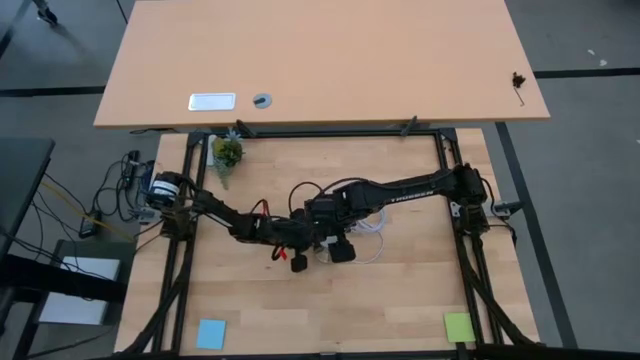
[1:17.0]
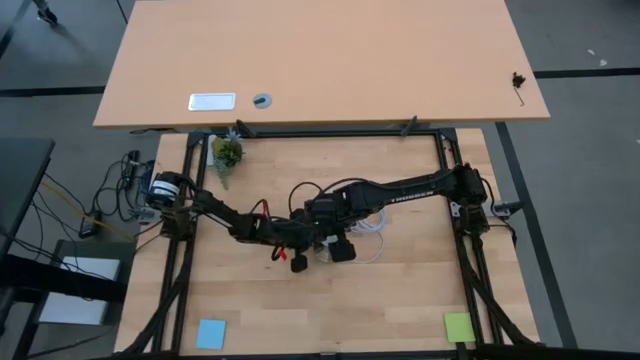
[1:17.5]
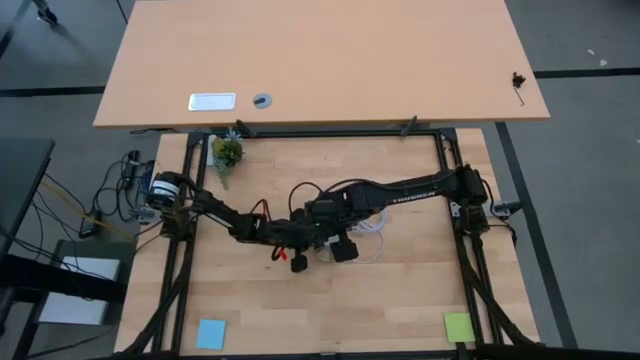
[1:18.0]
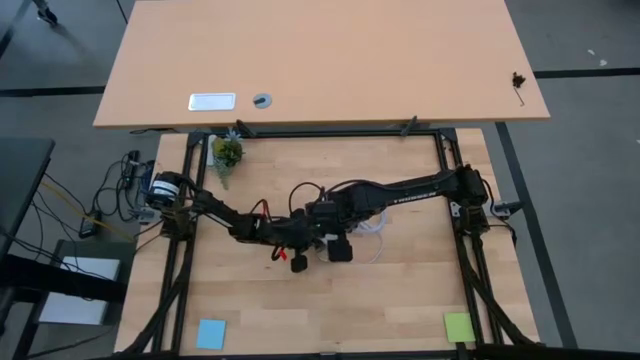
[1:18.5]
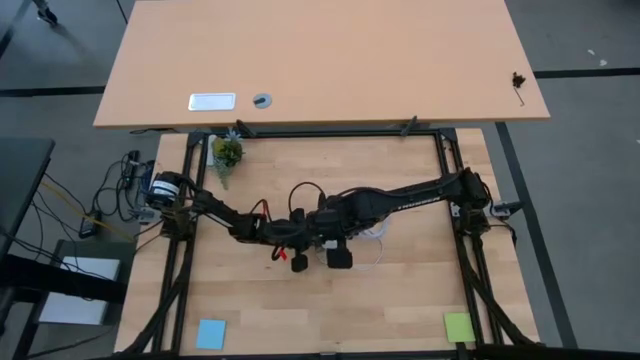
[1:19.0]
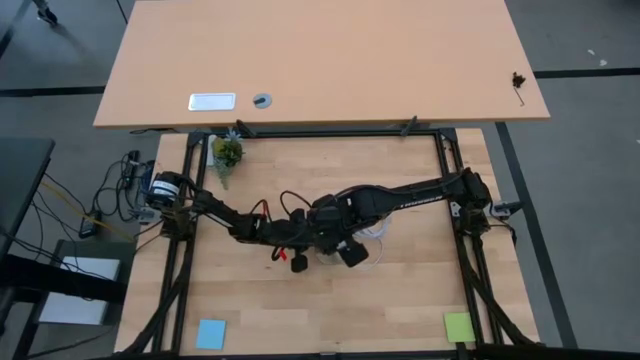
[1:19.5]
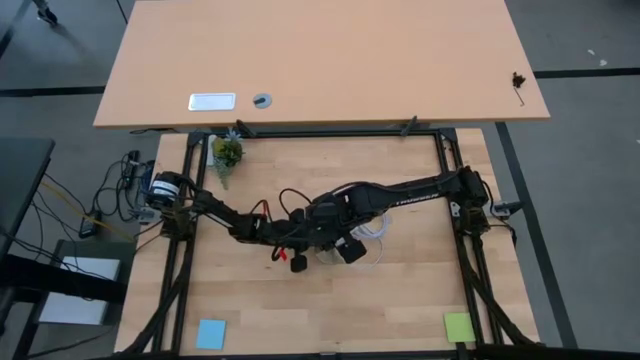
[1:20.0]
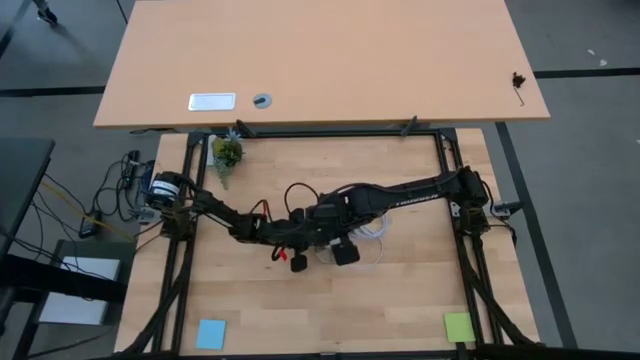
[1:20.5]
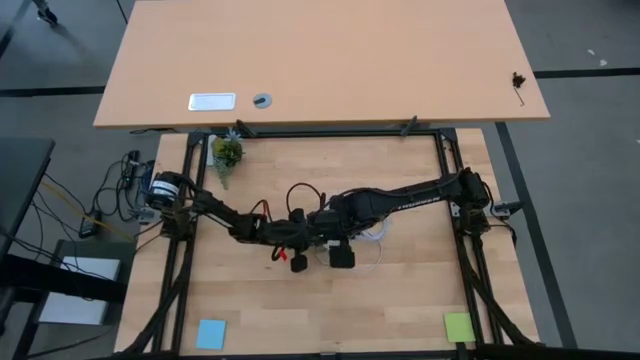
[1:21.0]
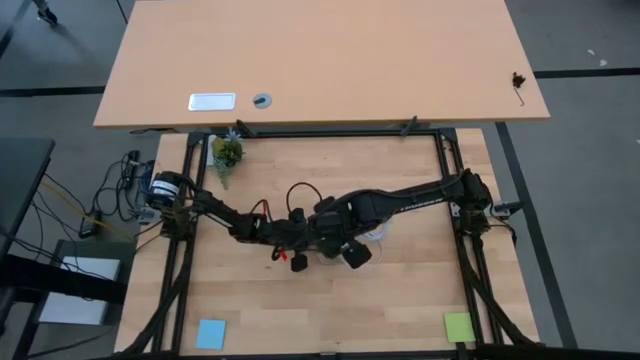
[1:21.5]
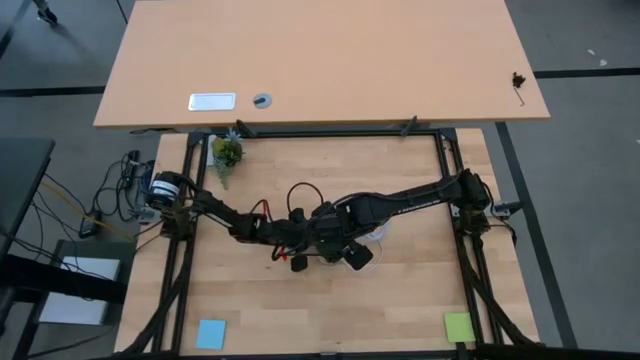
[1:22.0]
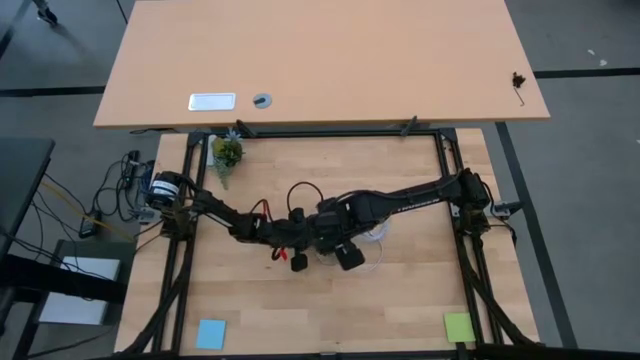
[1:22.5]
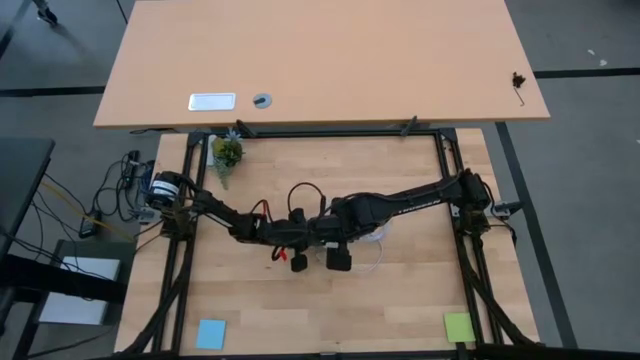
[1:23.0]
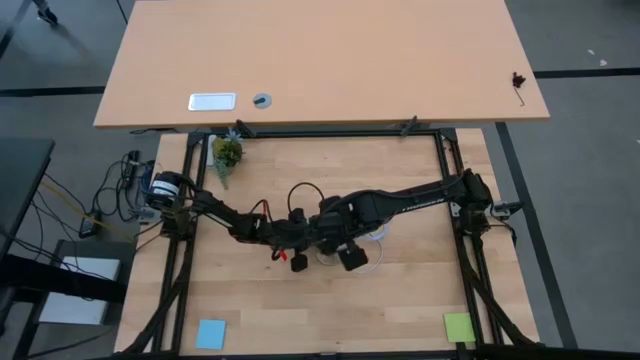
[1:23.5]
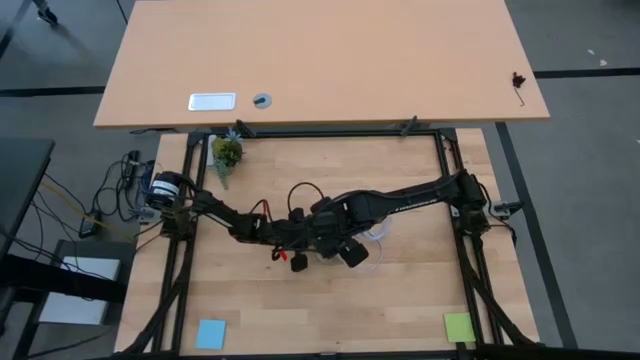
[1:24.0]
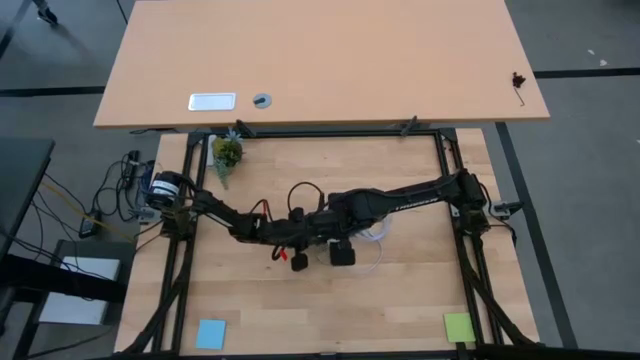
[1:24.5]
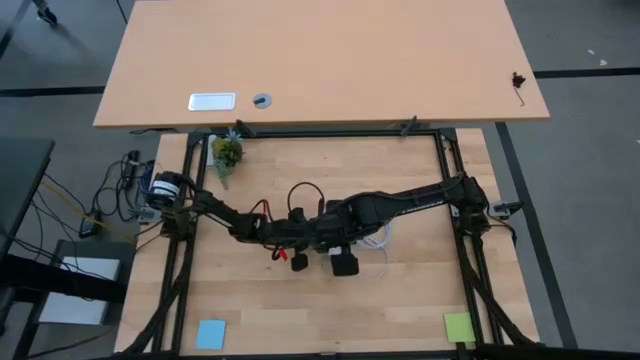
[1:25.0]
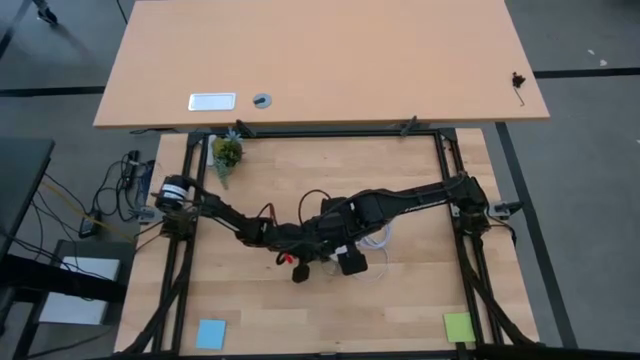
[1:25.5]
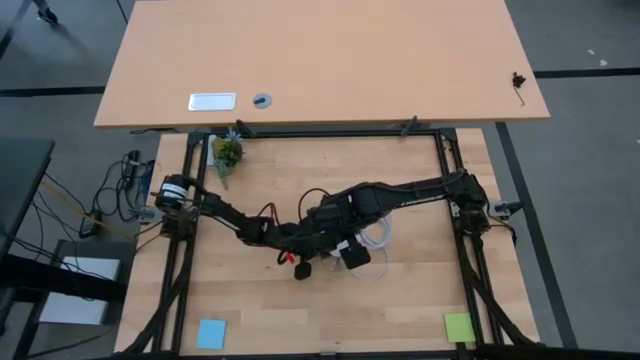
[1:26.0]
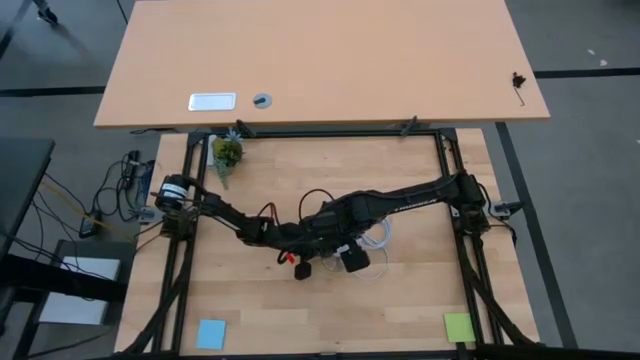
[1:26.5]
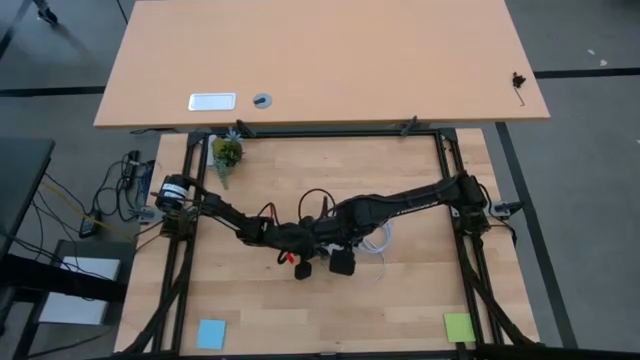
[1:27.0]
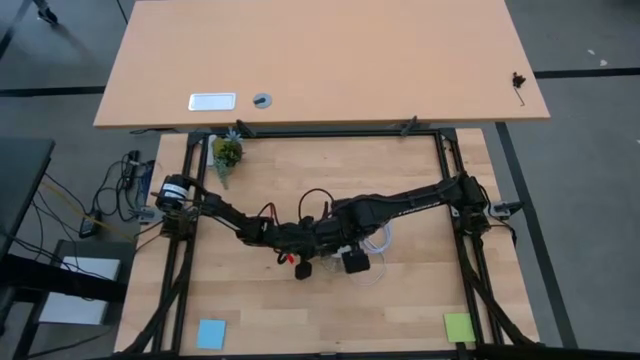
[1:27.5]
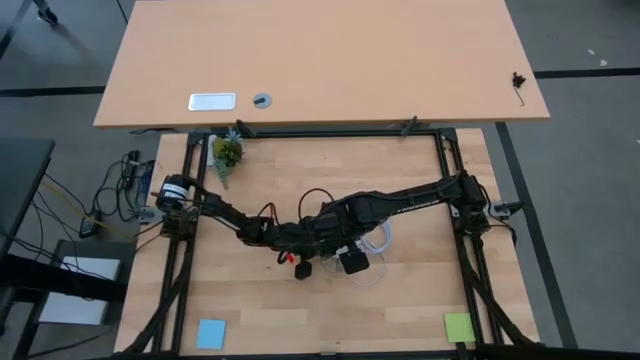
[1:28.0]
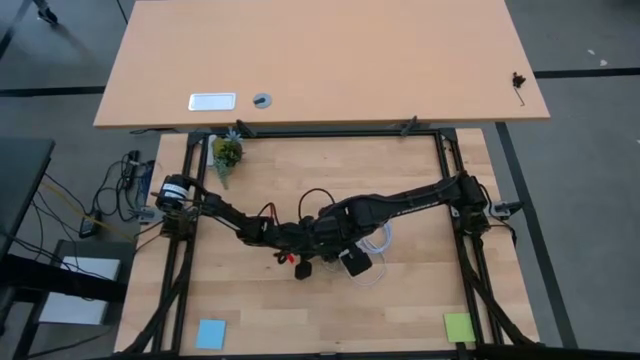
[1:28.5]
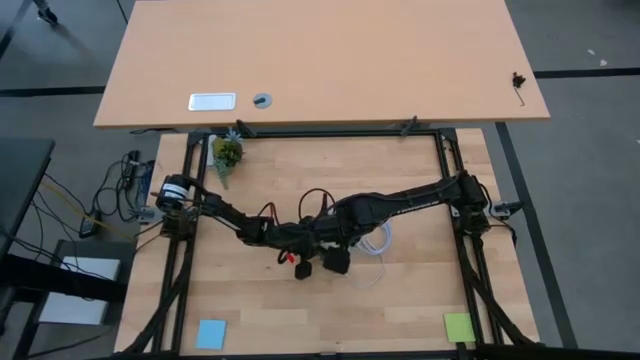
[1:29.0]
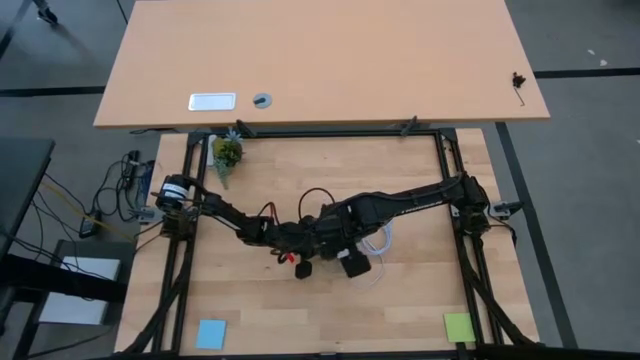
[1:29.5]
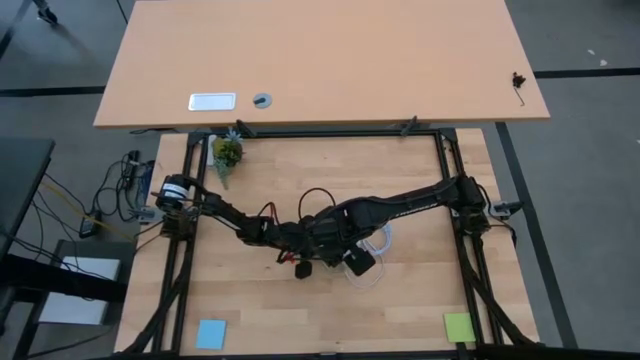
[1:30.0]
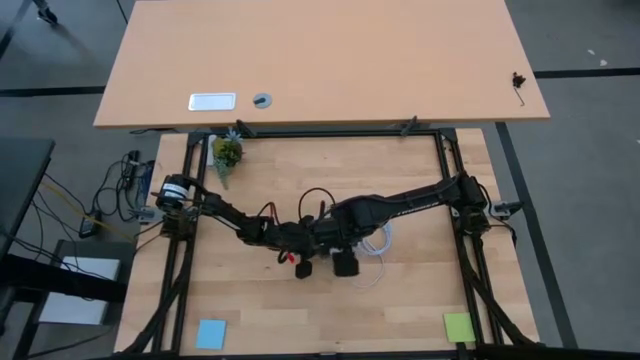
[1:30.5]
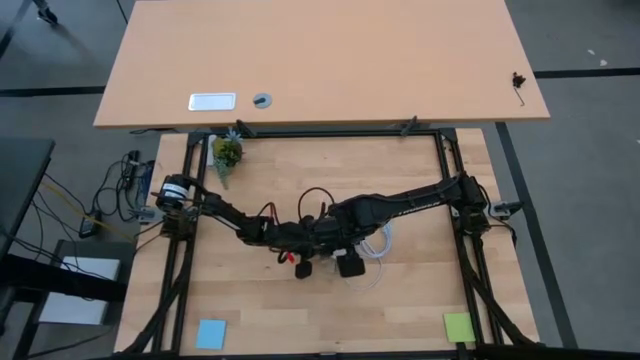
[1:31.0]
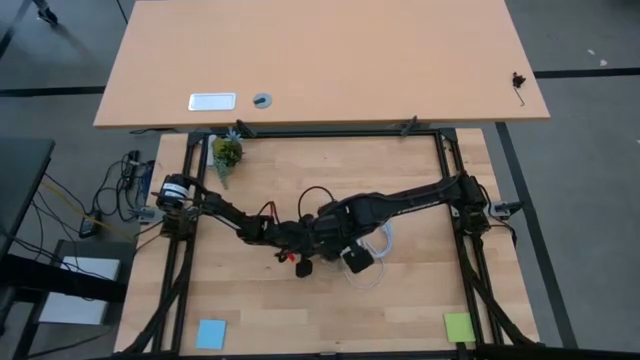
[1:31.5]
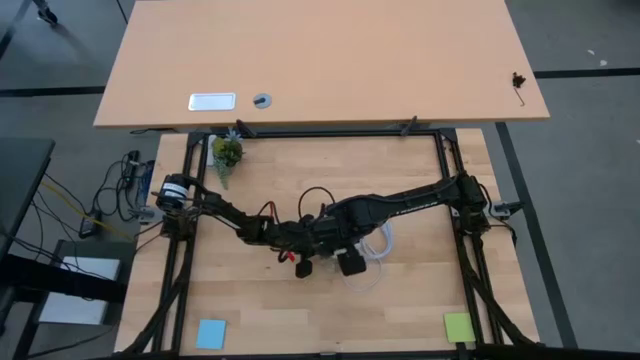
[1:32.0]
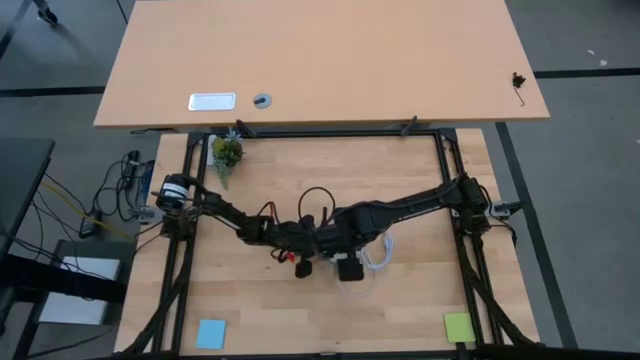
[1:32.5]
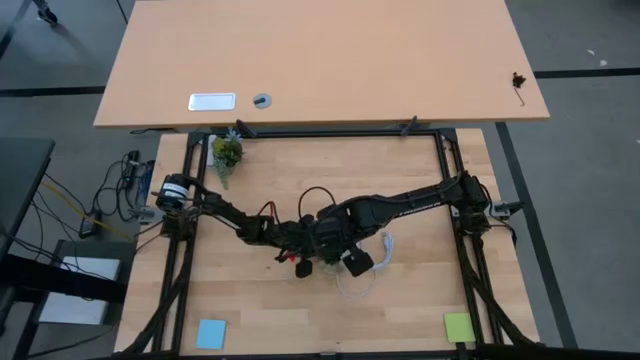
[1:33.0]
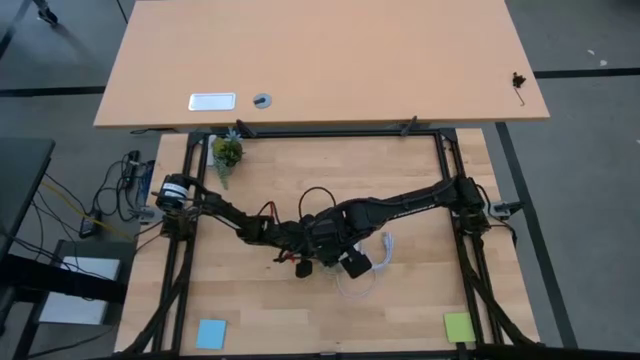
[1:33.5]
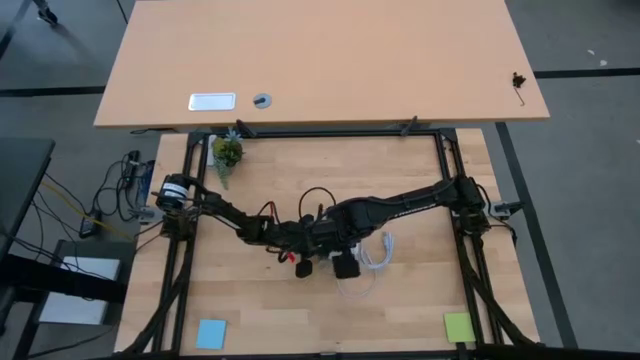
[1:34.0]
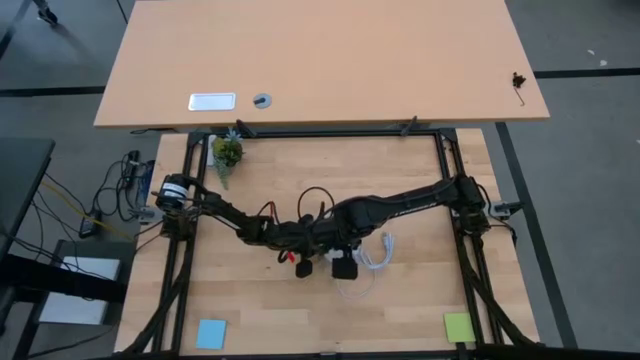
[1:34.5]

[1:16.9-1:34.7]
Task: Screw lightbulb
Insert the lightbulb into the lamp socket

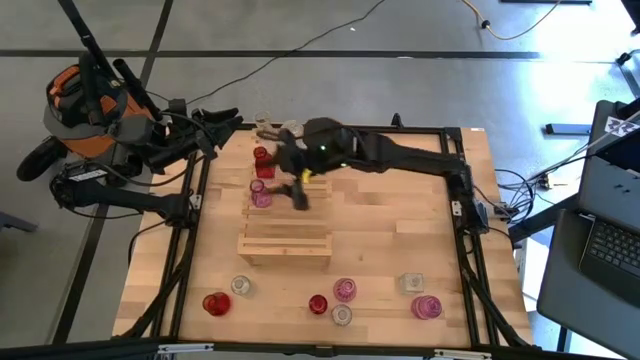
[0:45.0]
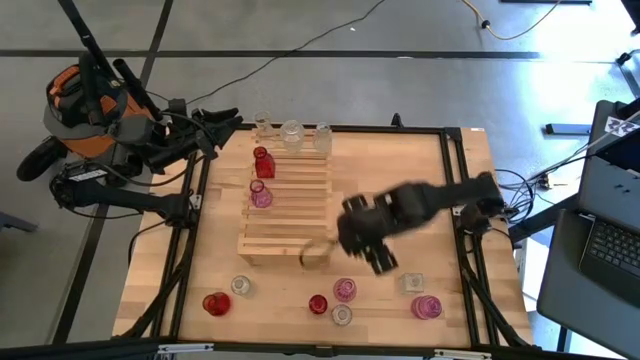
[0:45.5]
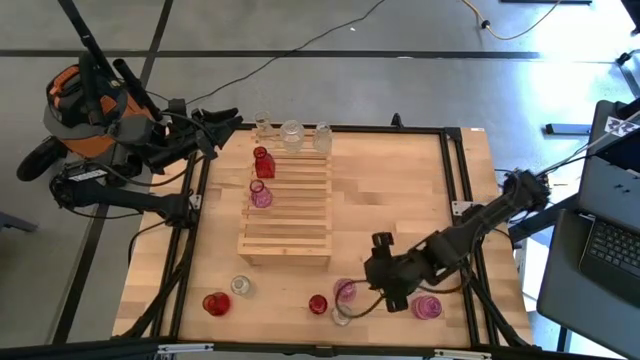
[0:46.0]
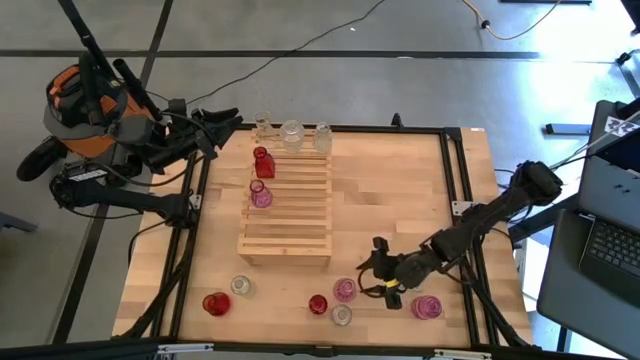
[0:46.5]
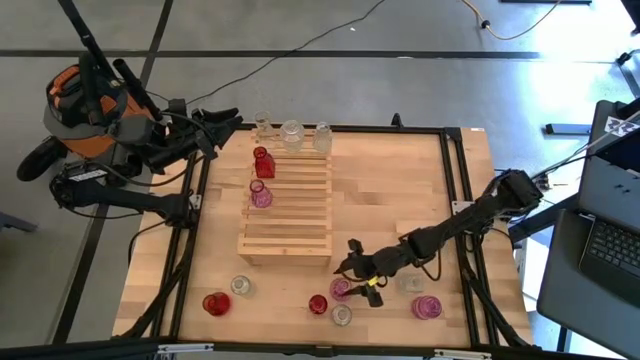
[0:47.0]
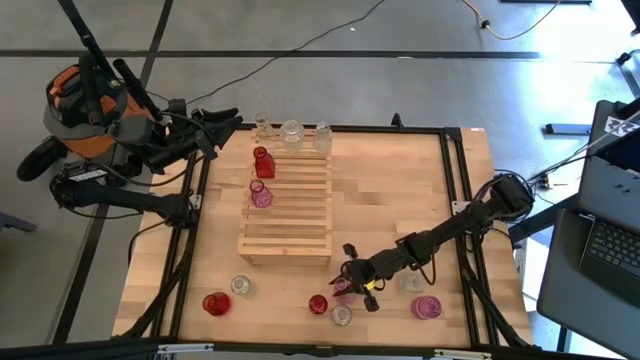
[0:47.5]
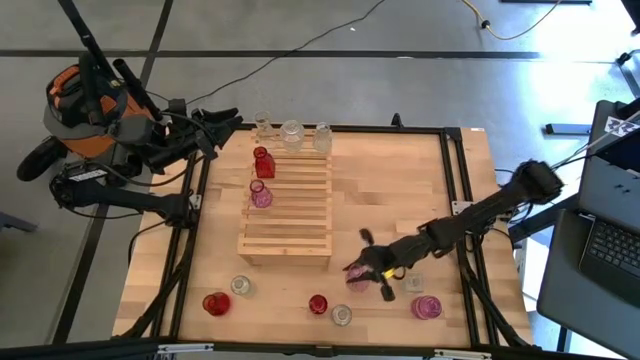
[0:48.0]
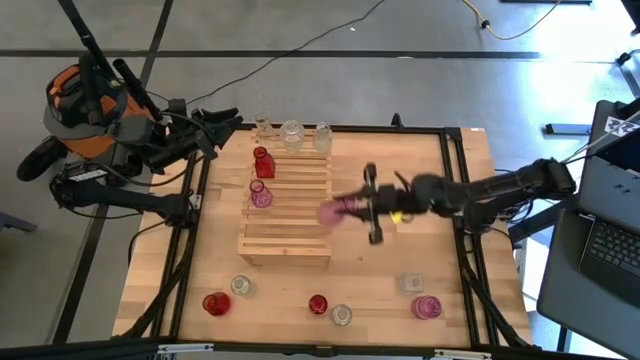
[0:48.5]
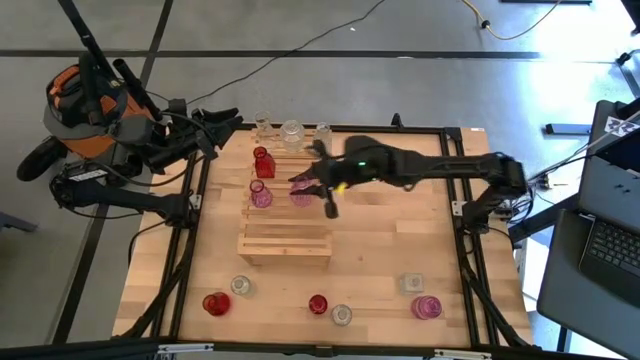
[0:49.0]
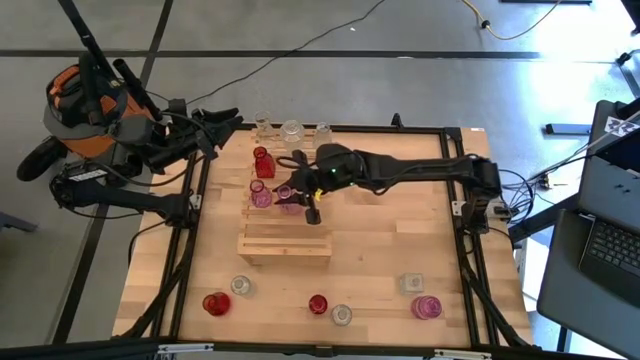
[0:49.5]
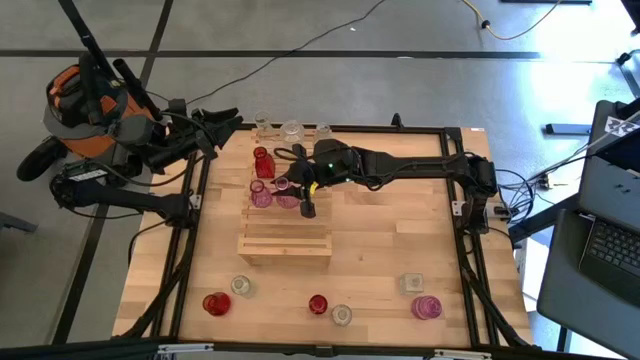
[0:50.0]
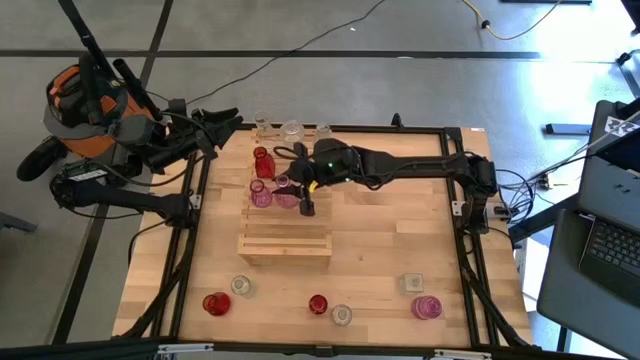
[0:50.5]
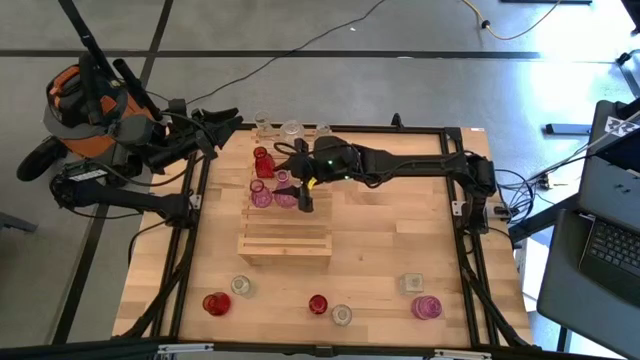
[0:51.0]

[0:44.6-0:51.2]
Task: sort vases onto shelf
Put the pink vase on the shelf aligned with the other pink vase
